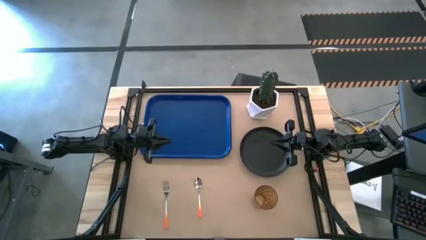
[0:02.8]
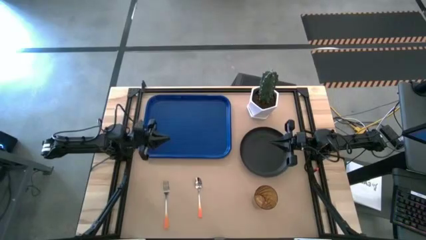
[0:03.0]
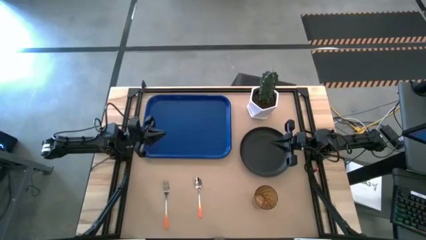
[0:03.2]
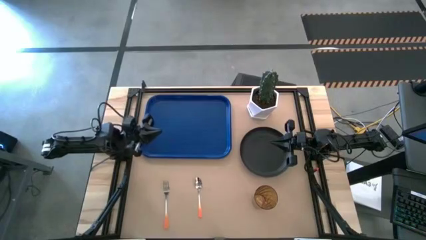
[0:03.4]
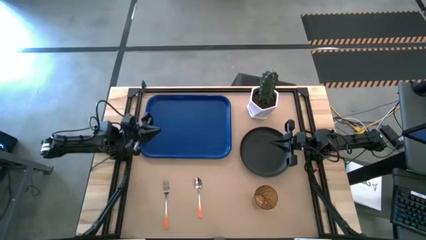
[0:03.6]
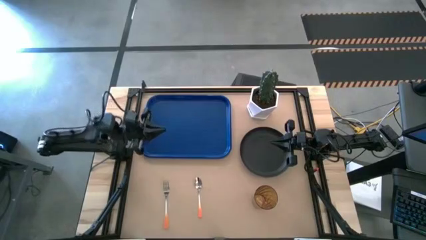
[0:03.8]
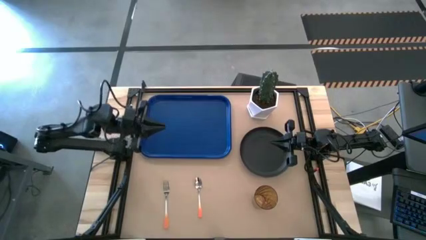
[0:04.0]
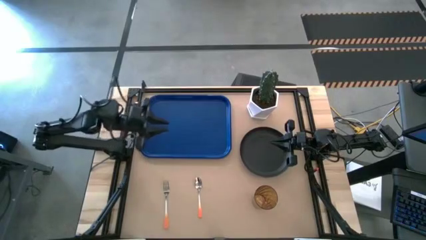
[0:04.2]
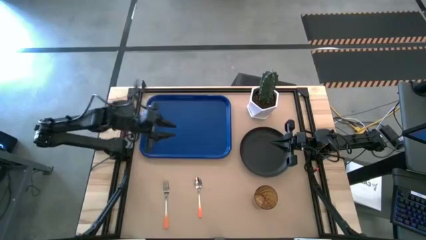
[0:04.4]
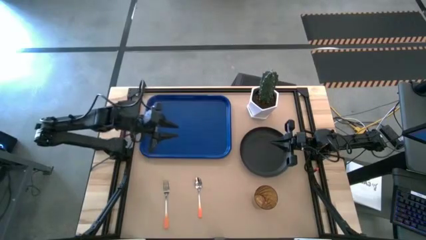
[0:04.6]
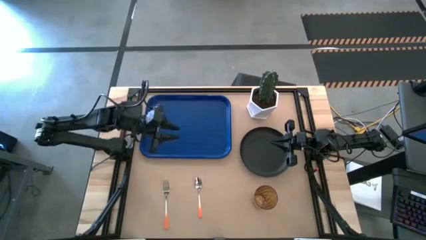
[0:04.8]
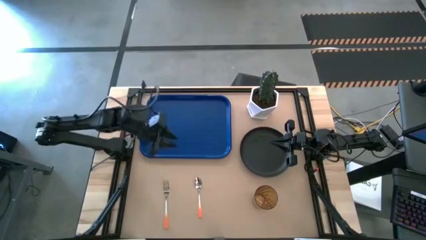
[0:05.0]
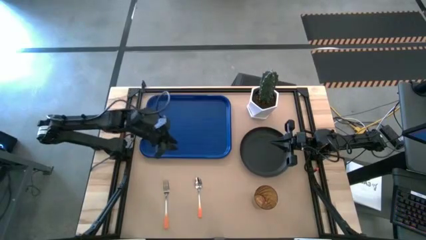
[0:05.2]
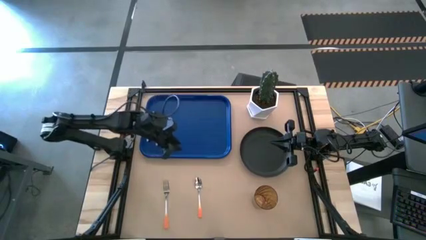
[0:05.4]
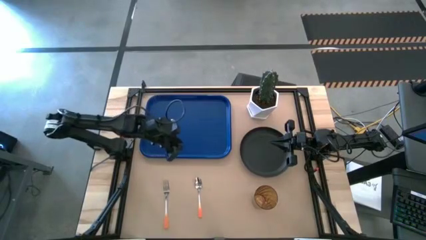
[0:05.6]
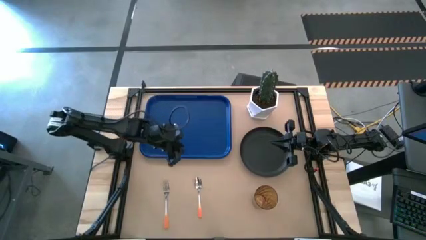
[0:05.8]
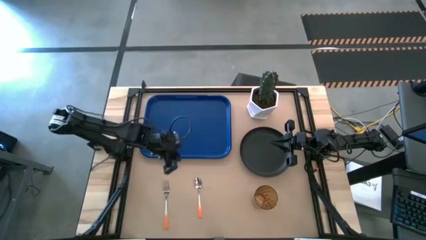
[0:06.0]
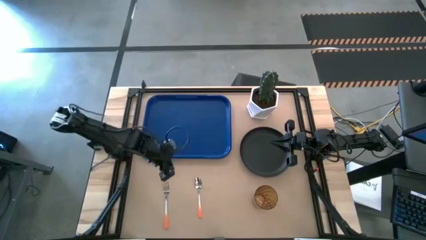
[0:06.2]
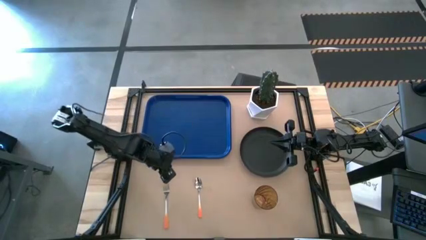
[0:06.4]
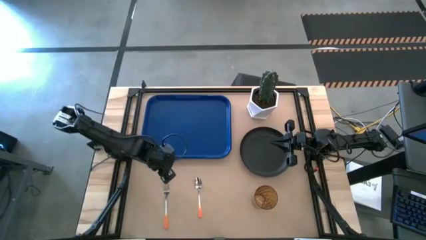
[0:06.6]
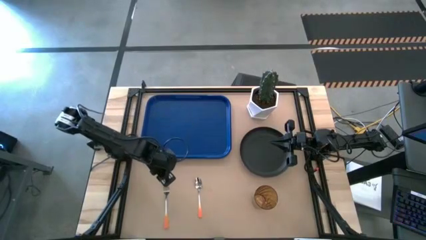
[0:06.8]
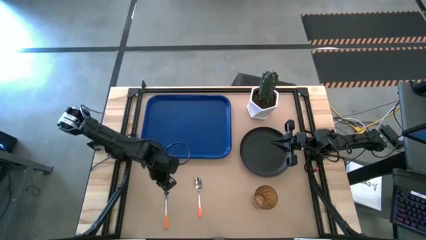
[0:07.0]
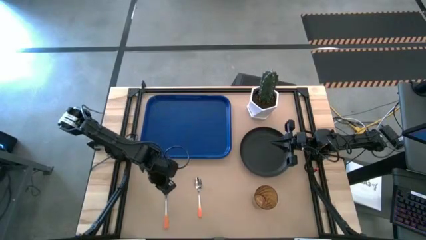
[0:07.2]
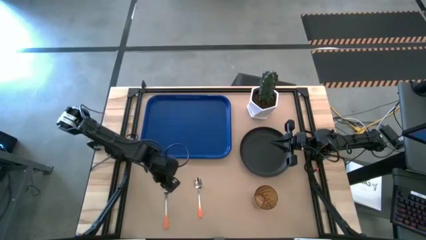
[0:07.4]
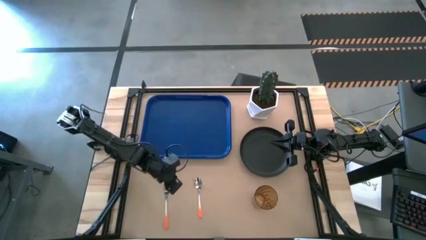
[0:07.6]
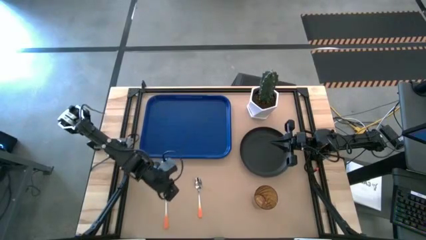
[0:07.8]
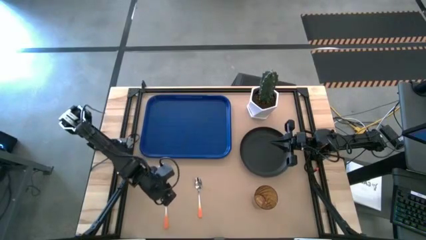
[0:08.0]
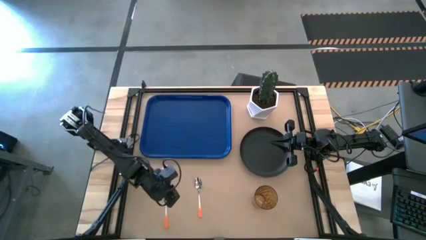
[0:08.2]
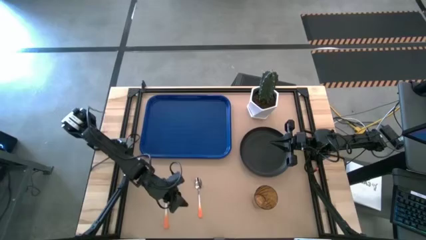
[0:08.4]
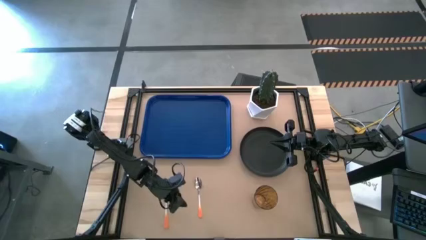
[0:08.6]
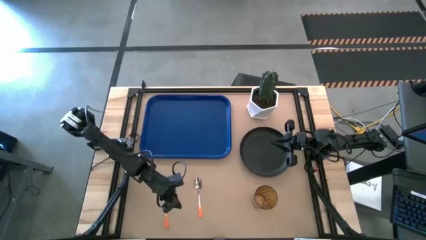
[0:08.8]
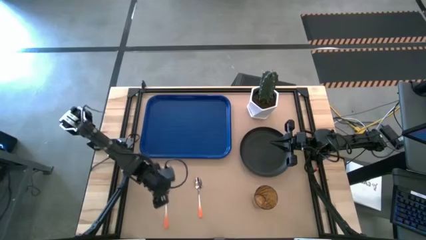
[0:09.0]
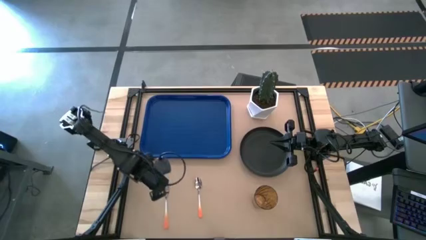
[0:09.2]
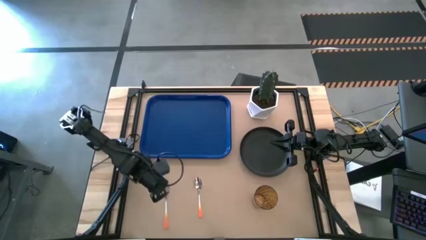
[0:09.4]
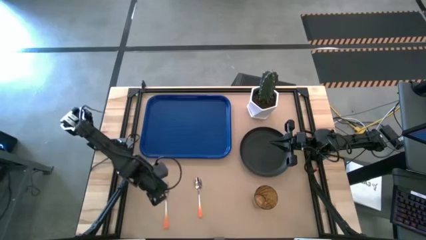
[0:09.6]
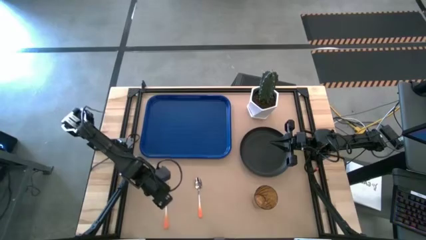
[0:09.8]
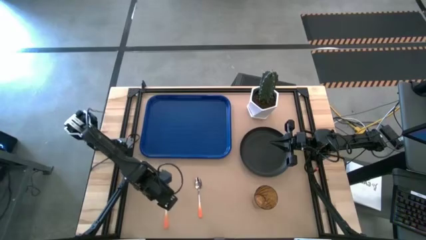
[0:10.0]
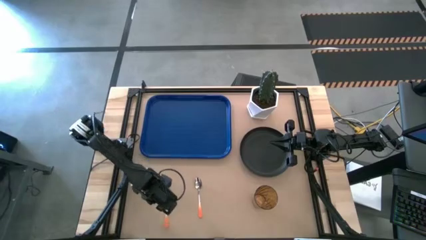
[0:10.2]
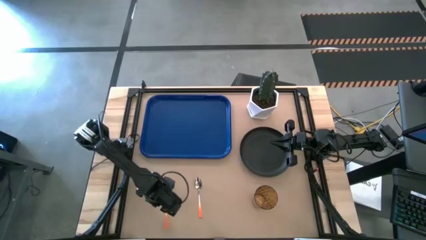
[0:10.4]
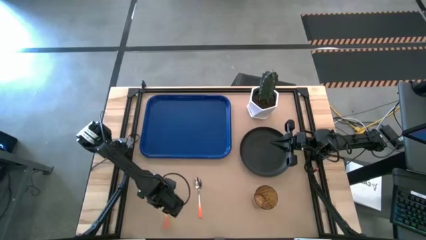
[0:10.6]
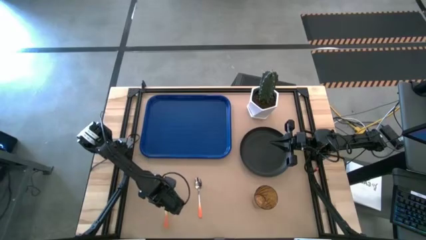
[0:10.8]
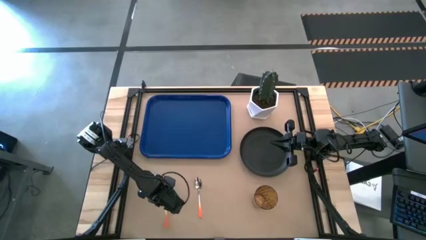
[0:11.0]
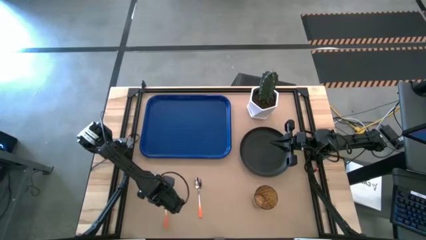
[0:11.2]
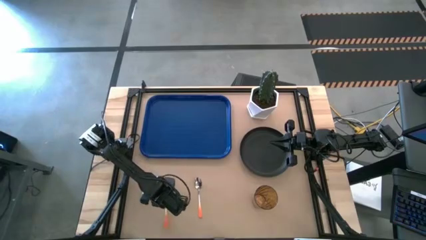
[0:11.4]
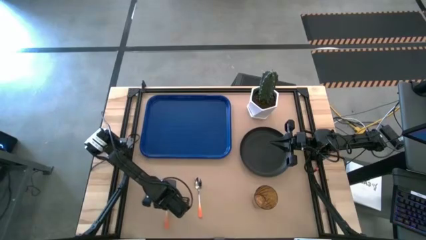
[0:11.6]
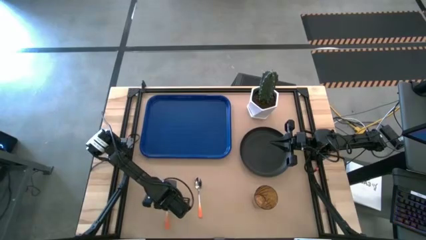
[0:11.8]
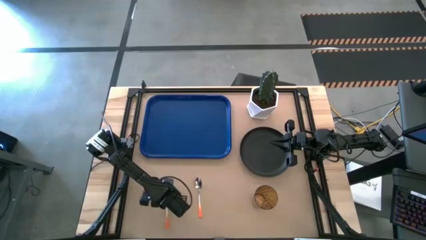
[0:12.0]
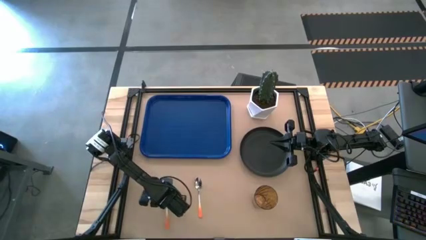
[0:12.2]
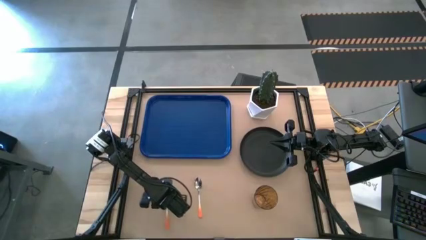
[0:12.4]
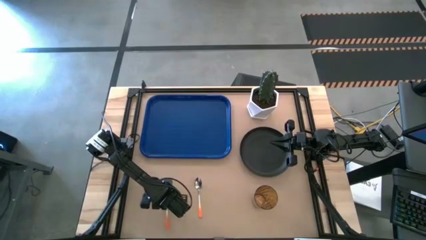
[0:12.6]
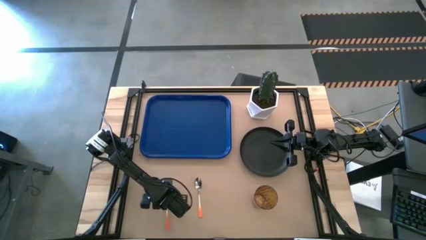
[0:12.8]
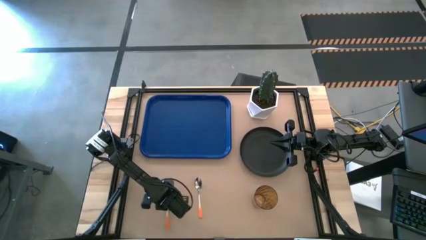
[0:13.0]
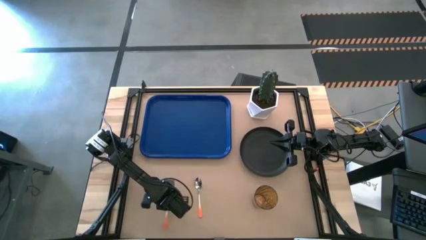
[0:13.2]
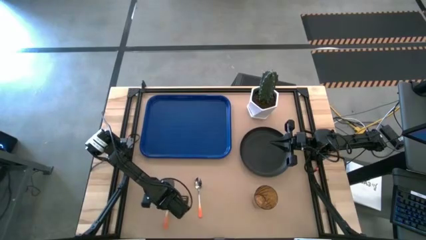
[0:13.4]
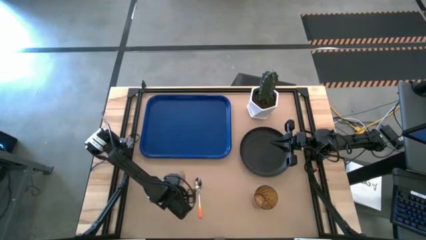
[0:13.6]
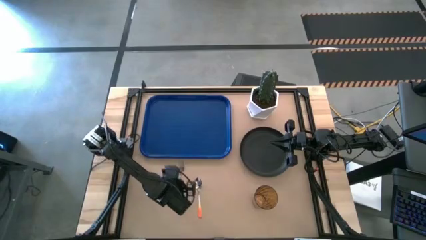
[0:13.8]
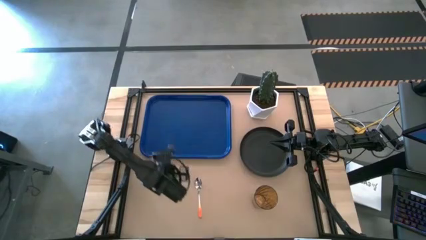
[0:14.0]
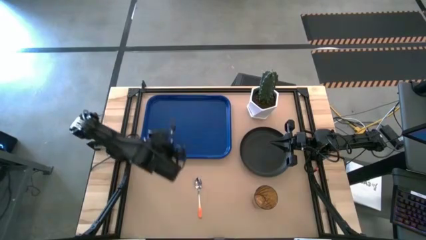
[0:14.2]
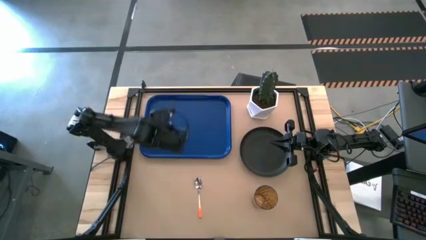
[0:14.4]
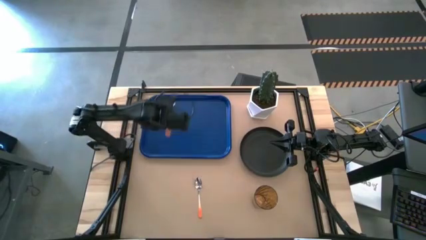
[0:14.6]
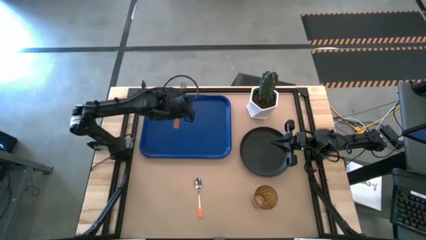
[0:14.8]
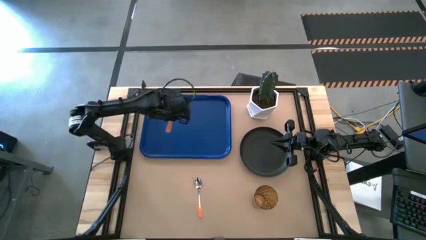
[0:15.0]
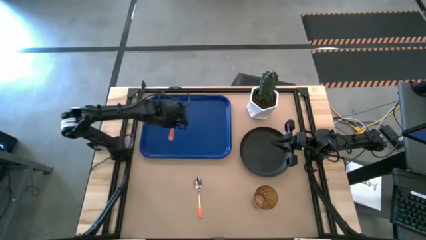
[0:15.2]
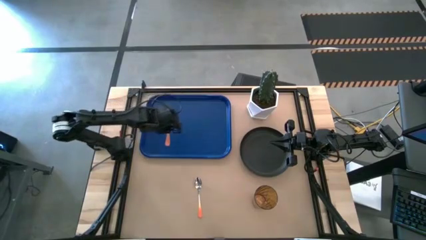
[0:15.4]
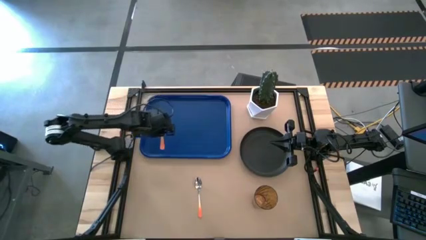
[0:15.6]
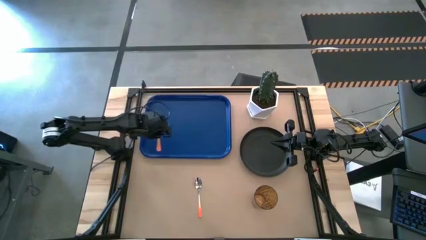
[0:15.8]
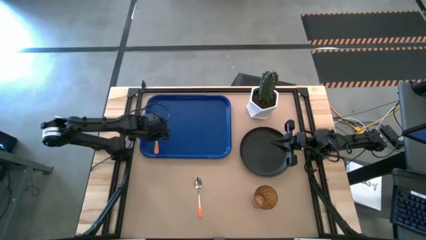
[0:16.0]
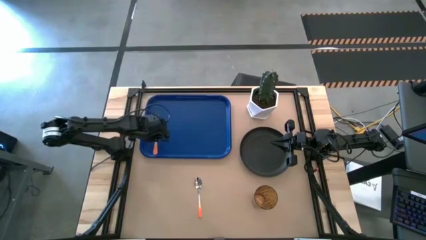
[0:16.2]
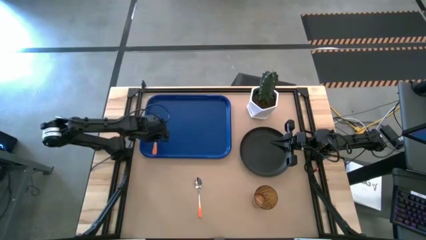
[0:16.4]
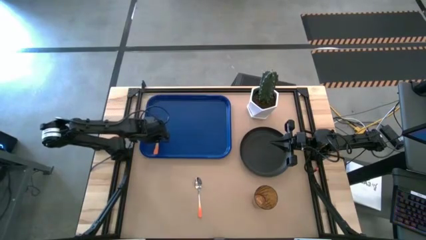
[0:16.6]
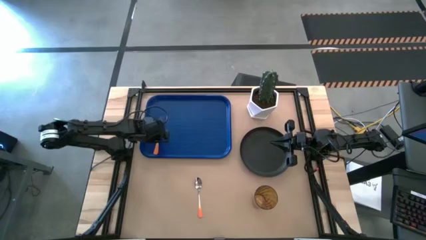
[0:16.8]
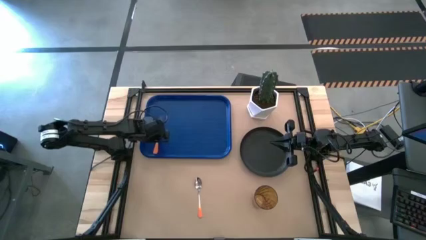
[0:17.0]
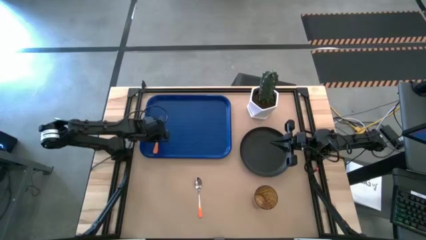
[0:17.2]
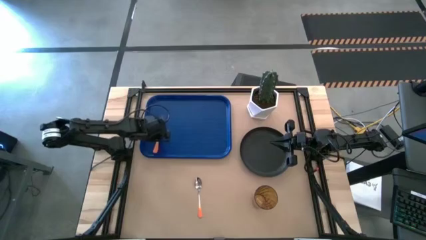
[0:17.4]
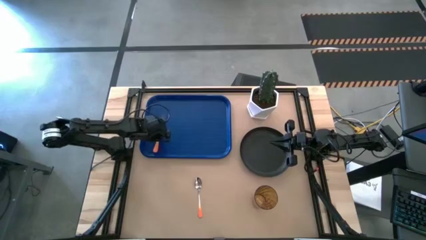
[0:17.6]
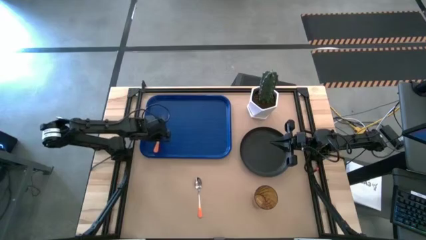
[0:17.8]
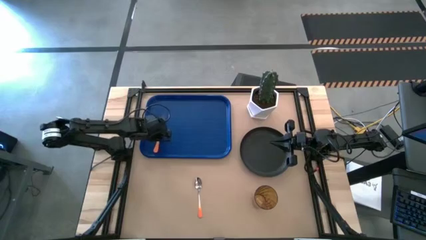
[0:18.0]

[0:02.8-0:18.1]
Task: Pick and place plate/cup/fork/spoon on tray
Put the orange fork on the blue tray
